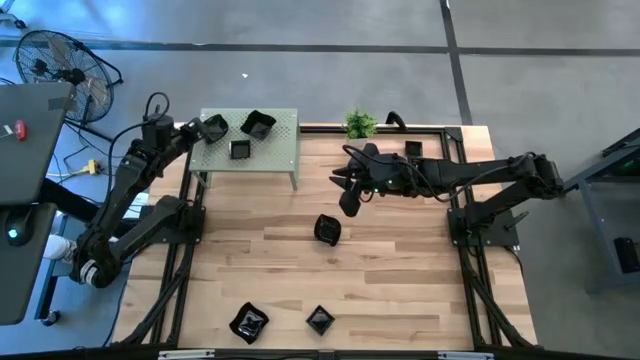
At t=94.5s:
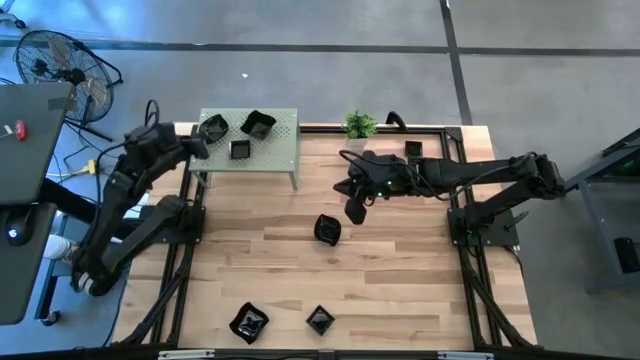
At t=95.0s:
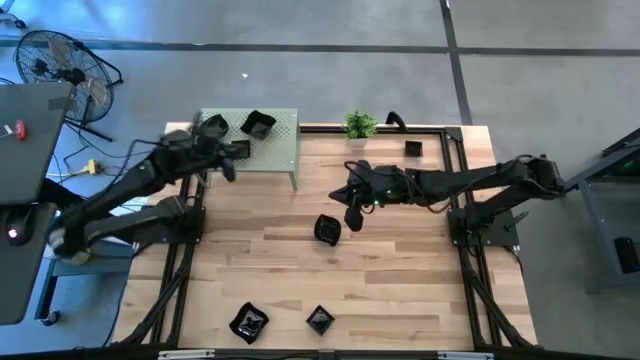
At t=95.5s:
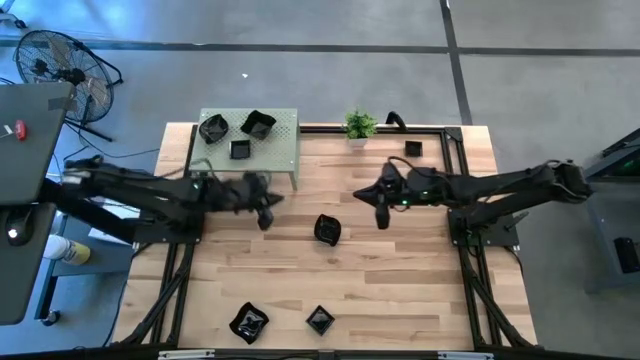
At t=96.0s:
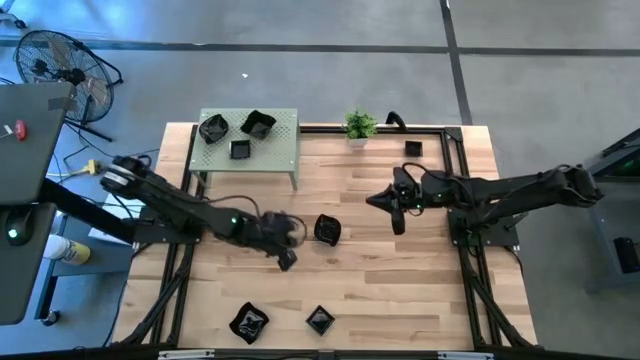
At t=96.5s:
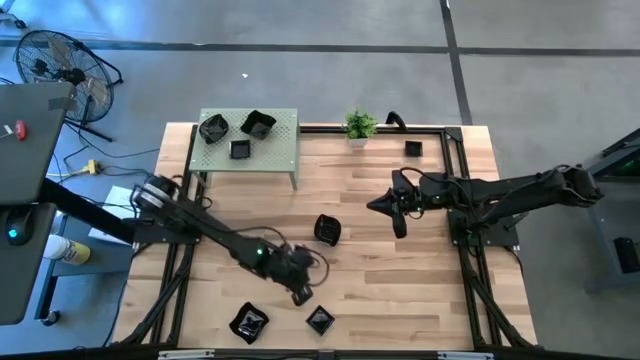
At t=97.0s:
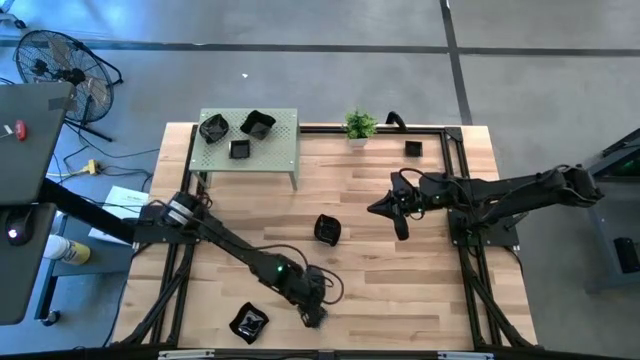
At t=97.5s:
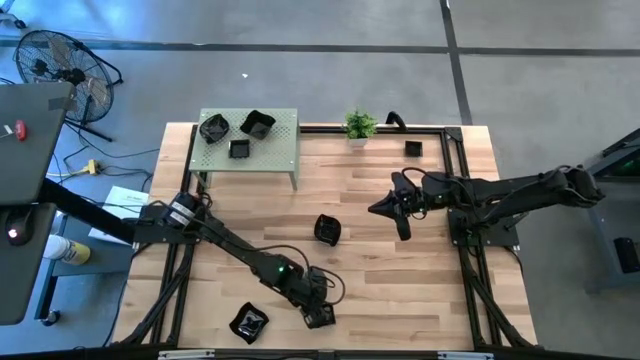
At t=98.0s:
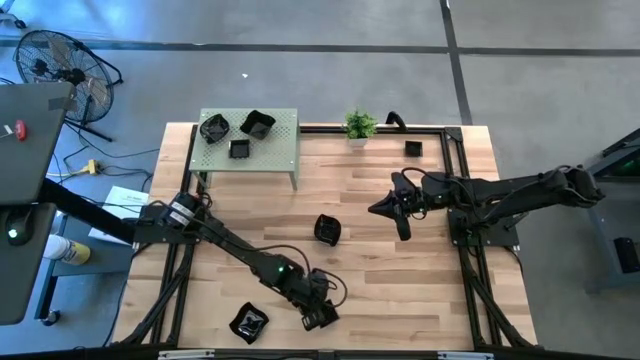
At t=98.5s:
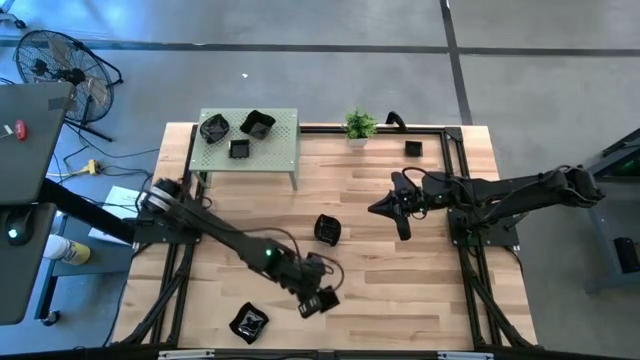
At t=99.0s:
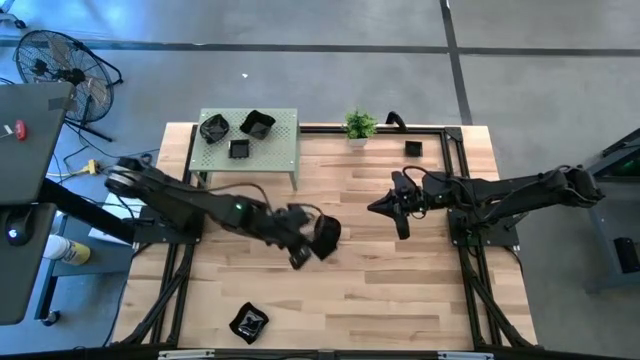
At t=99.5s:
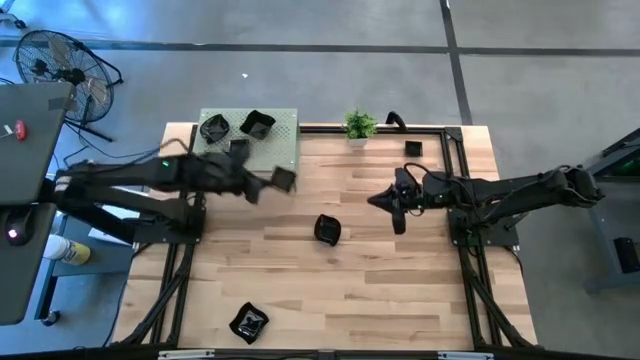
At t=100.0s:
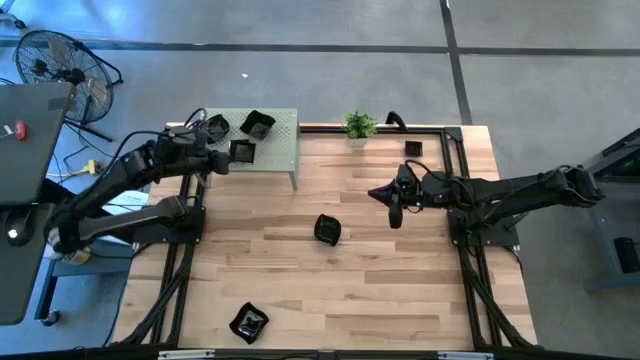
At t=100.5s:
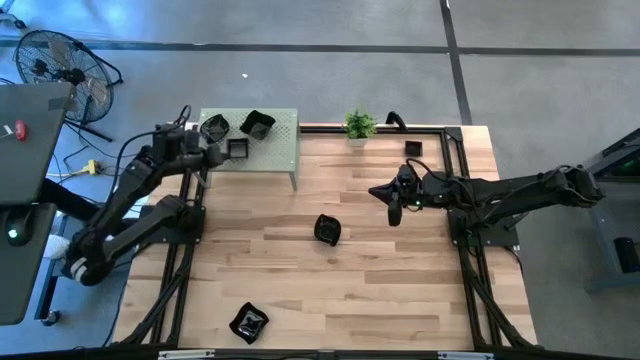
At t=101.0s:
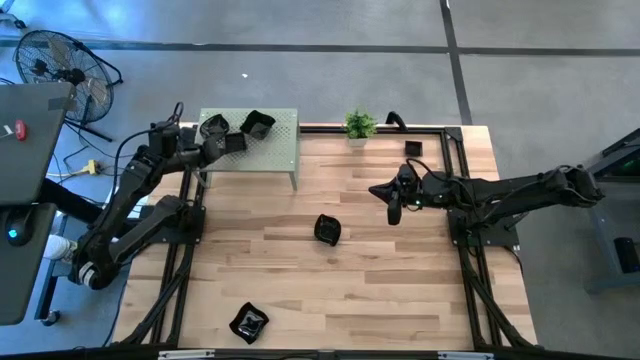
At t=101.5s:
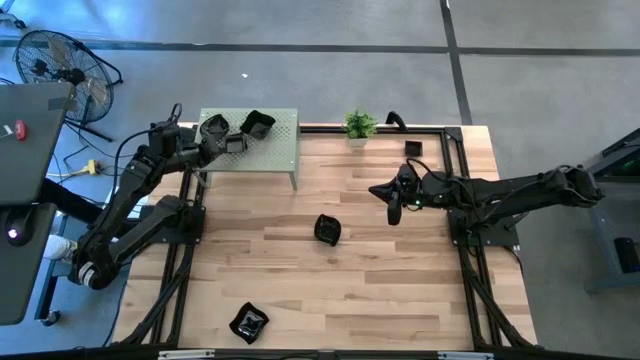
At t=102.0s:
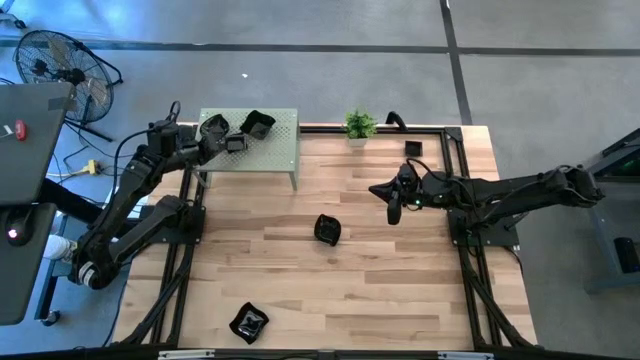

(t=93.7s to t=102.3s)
Task: Pick & Place Mini shaped plates
Stack the black square plate on top of the black square plate on the shelf

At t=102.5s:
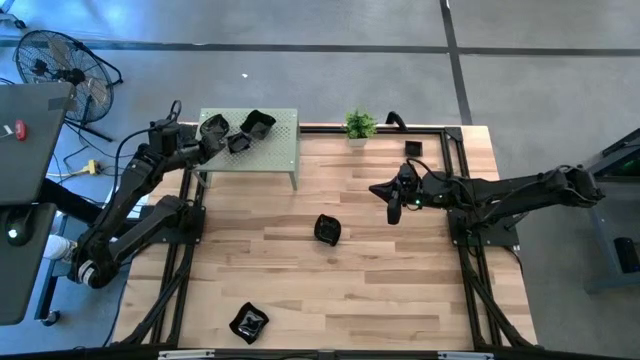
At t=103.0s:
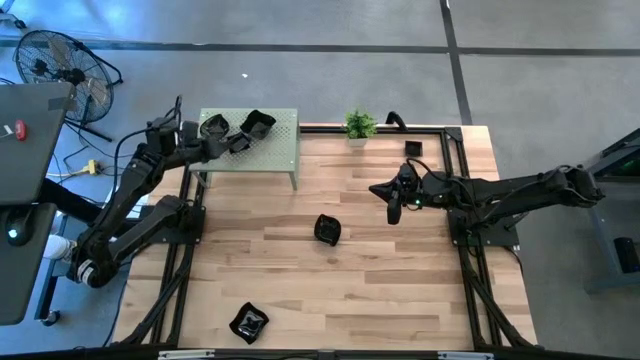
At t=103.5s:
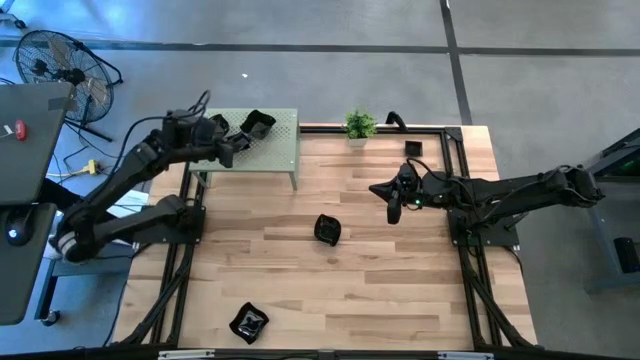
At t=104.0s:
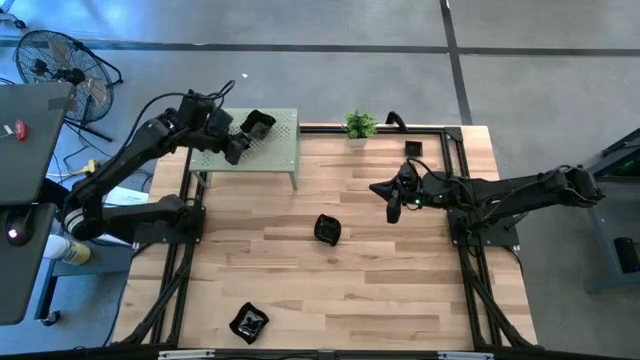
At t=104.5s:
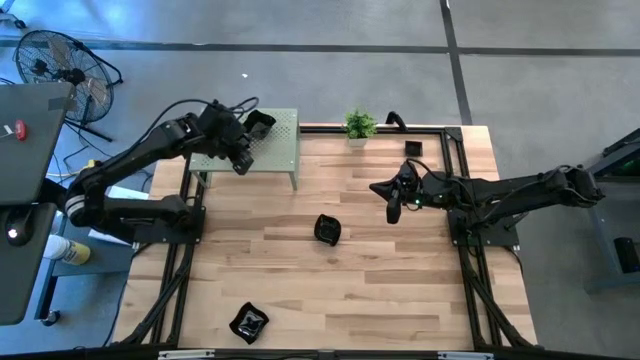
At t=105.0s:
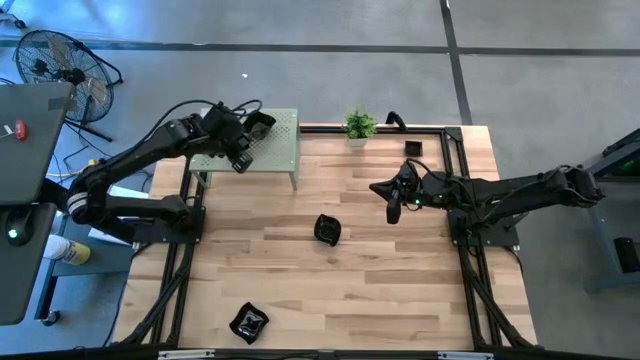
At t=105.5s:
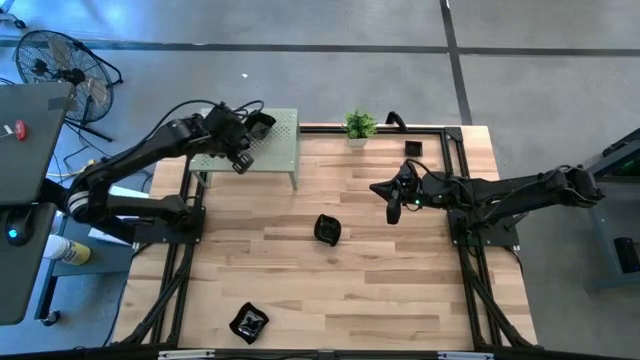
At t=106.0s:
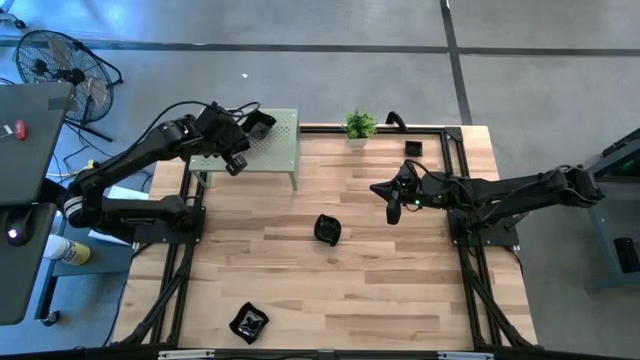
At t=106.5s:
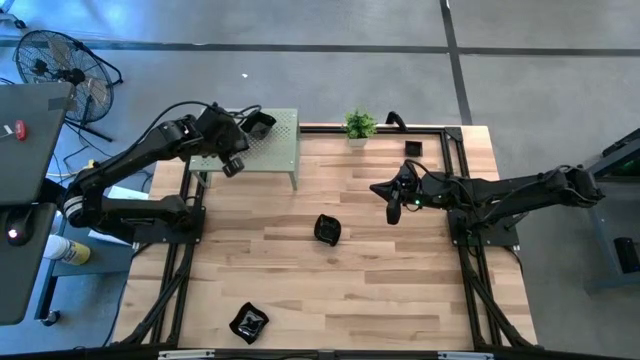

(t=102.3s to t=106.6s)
Stack the black square plate on top of the black square plate on the shelf

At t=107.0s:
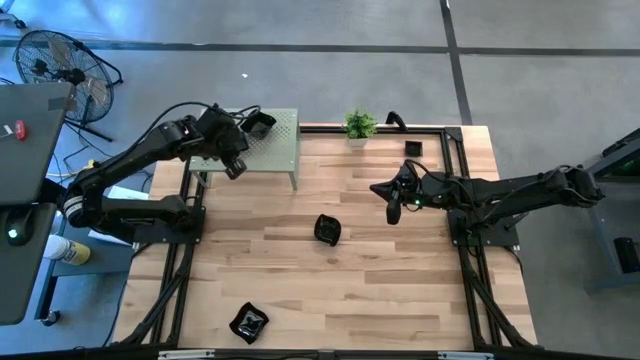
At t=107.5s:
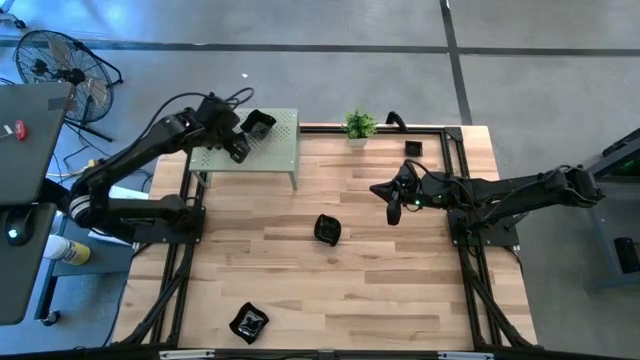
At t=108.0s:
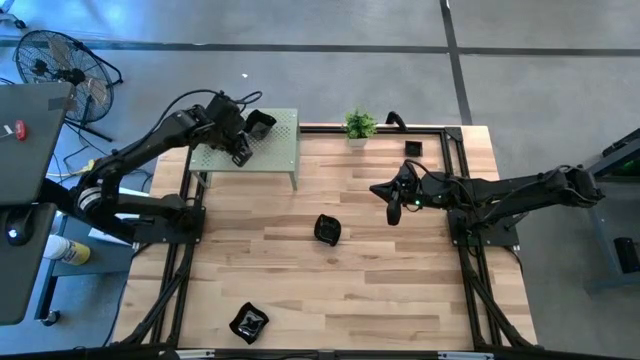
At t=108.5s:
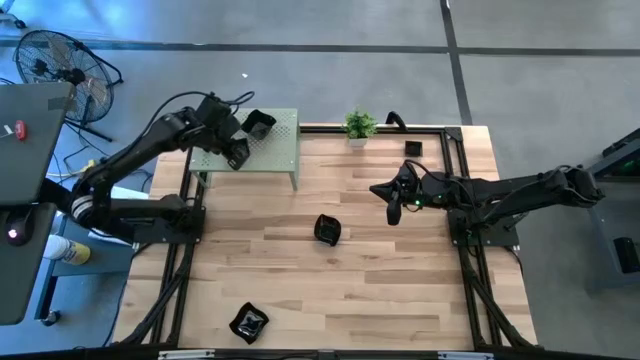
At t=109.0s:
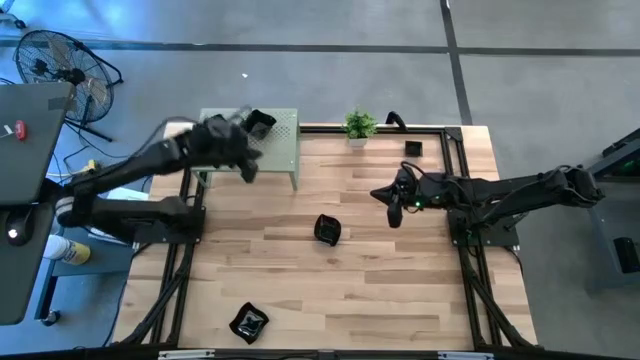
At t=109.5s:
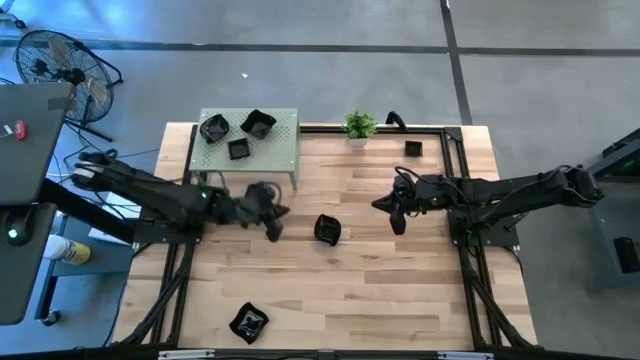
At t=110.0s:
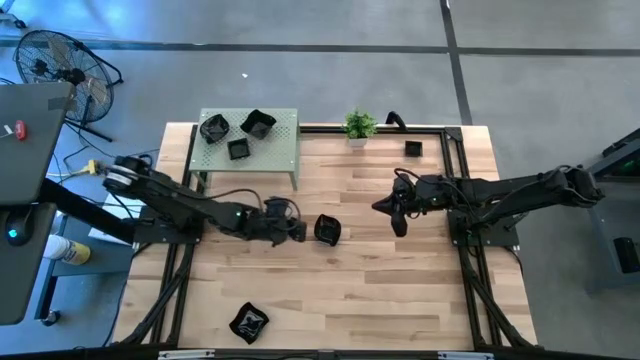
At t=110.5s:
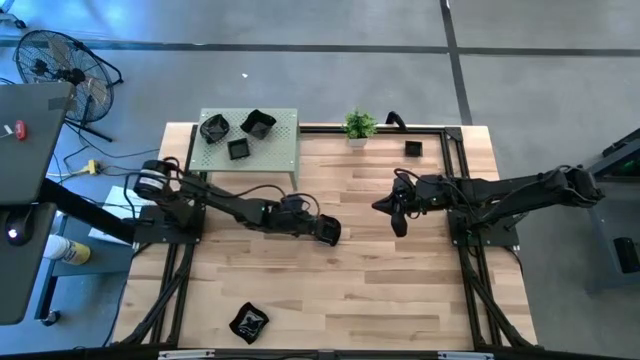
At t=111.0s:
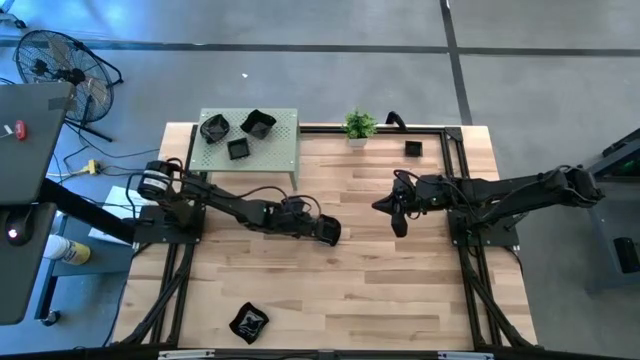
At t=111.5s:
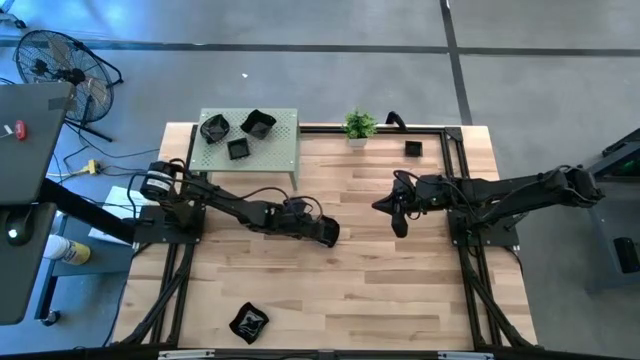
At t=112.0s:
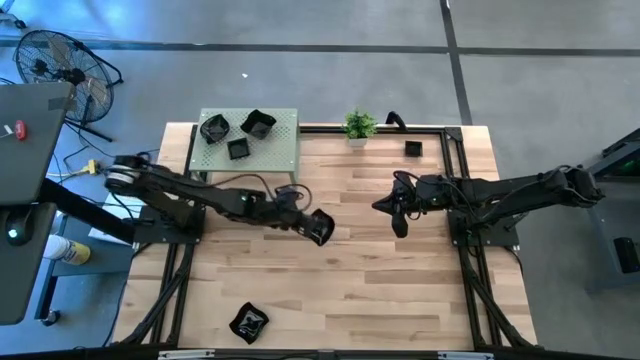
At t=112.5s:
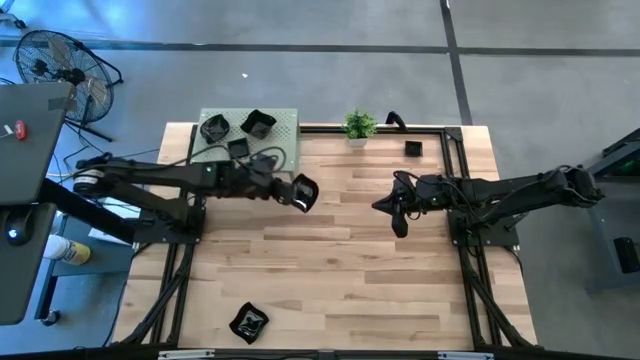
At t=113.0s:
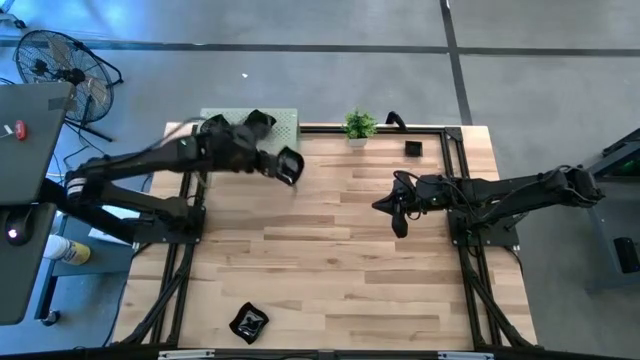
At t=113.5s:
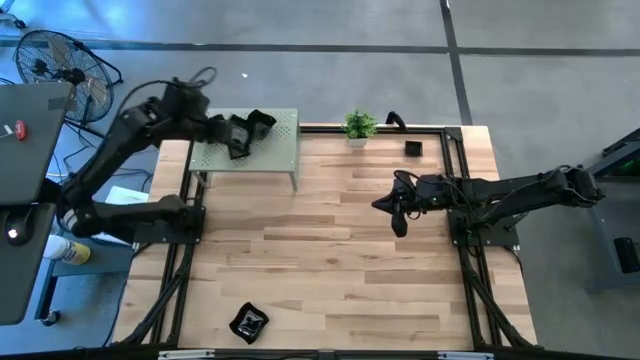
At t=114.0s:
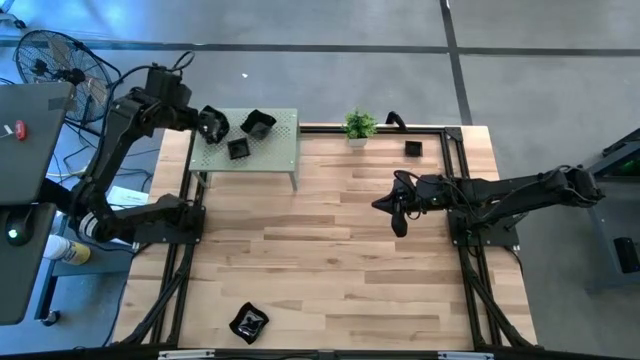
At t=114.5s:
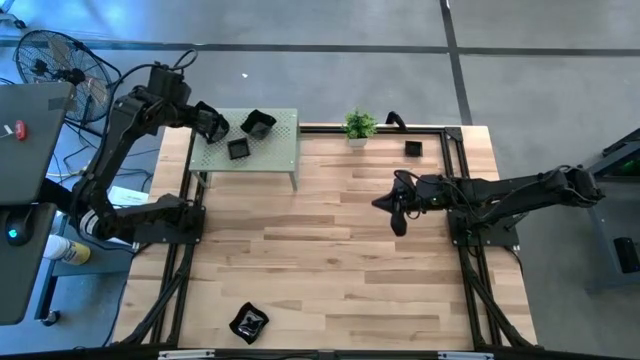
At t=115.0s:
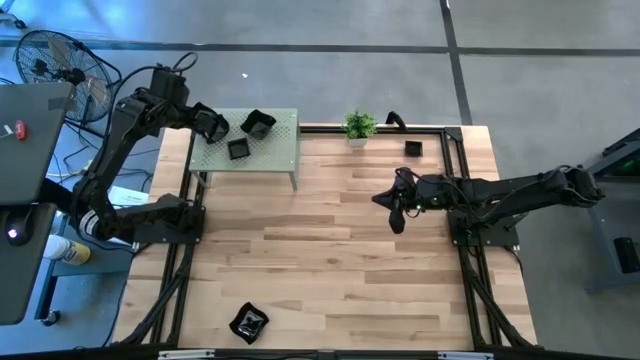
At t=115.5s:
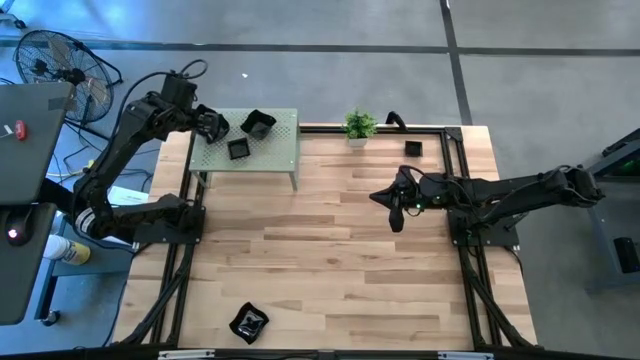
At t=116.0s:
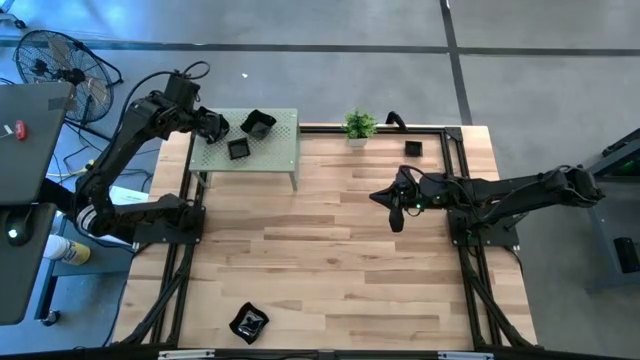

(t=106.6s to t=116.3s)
Stack the black leaf-shaped plate on top of the stacked black leaf-shaped plate on the shelf
